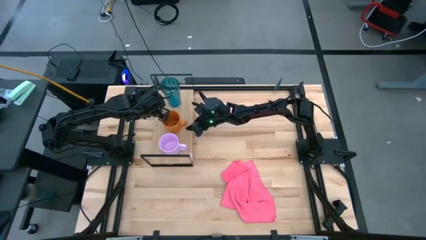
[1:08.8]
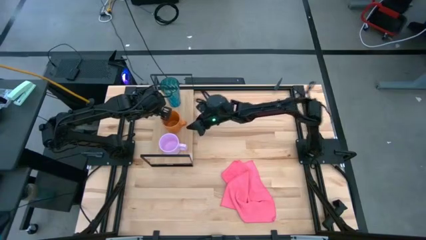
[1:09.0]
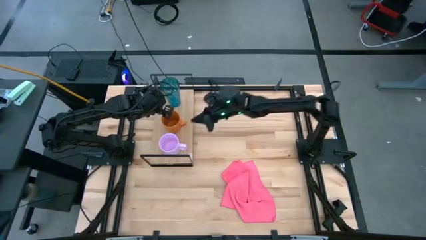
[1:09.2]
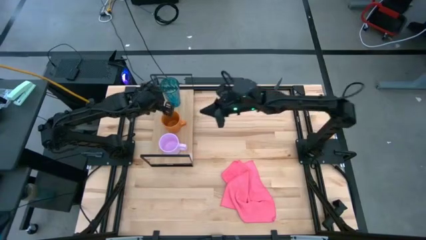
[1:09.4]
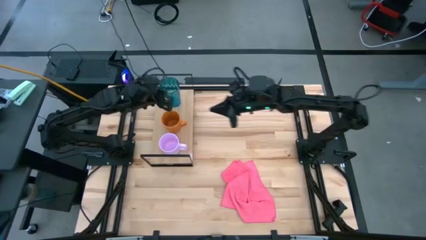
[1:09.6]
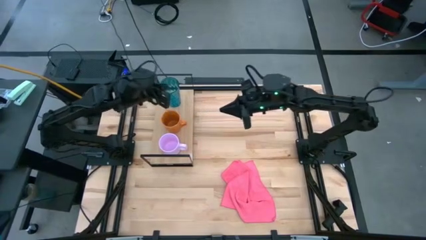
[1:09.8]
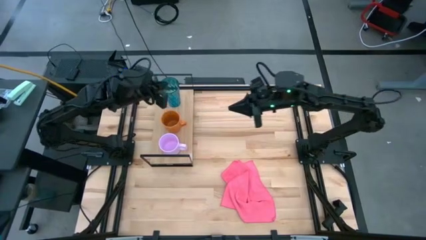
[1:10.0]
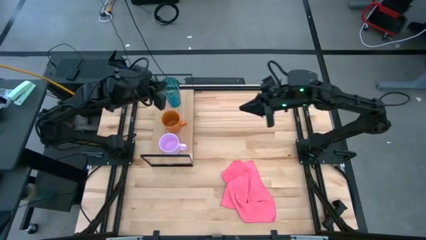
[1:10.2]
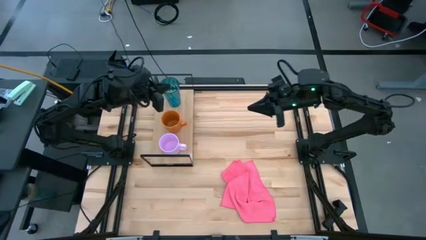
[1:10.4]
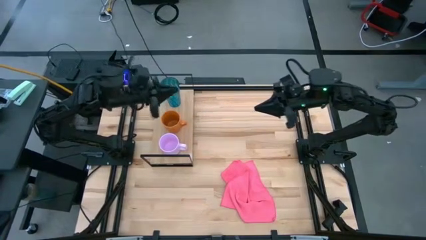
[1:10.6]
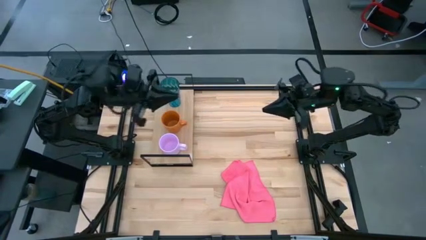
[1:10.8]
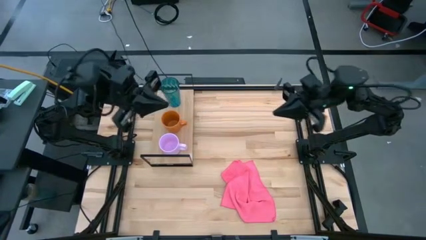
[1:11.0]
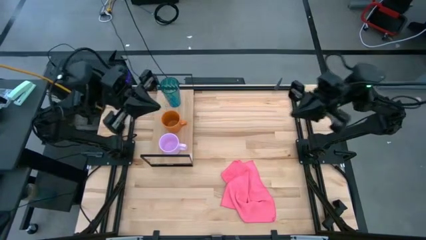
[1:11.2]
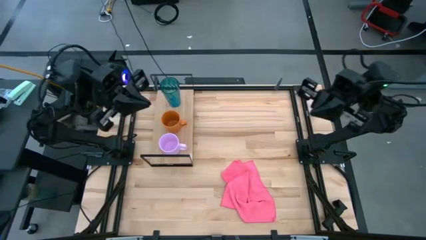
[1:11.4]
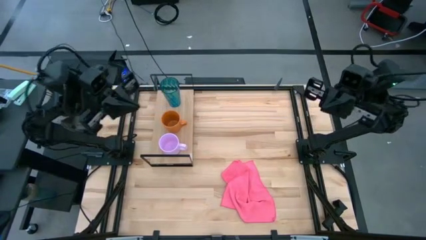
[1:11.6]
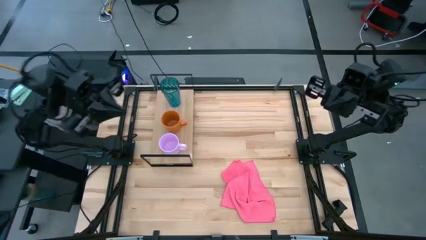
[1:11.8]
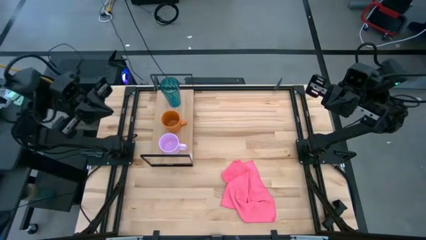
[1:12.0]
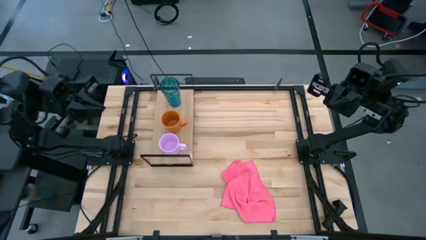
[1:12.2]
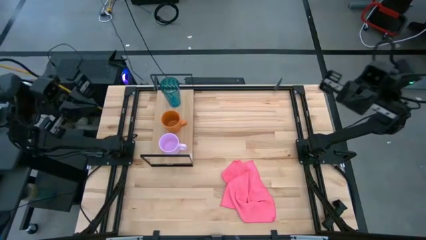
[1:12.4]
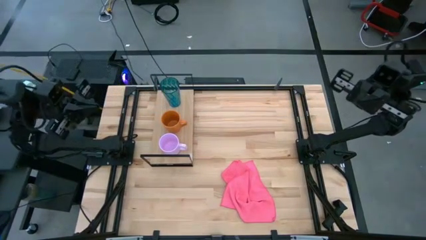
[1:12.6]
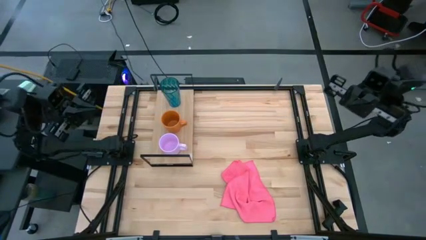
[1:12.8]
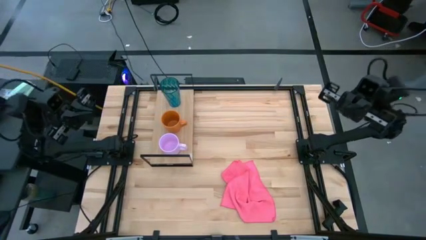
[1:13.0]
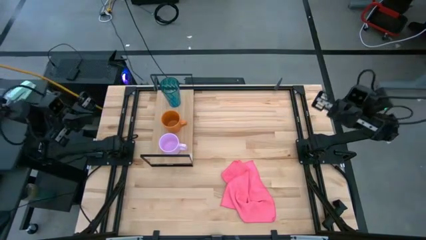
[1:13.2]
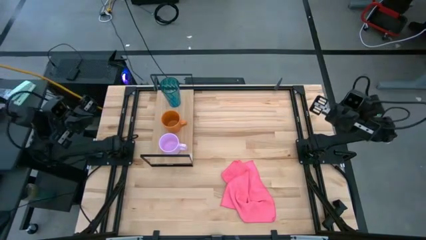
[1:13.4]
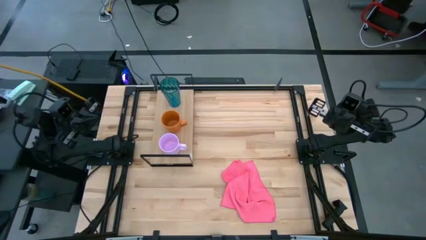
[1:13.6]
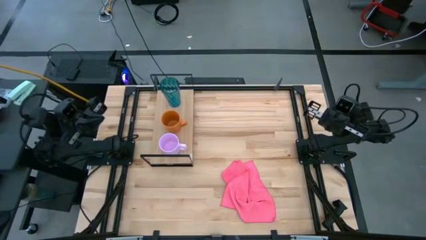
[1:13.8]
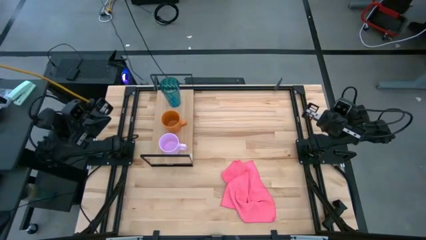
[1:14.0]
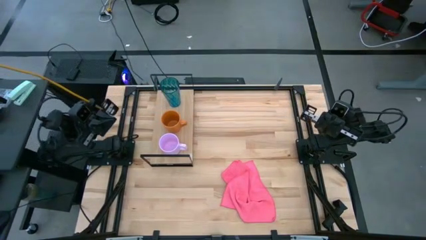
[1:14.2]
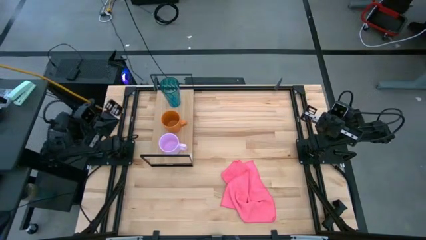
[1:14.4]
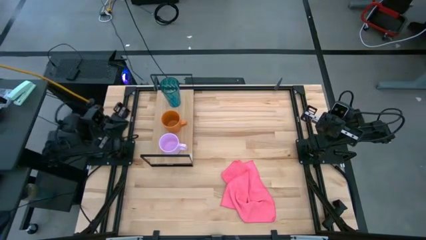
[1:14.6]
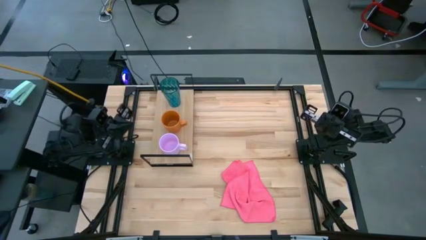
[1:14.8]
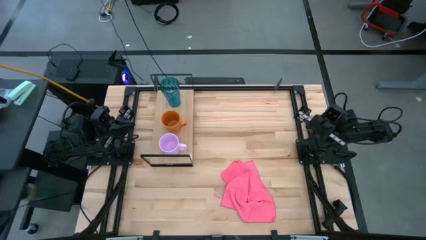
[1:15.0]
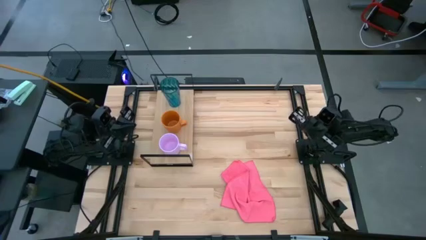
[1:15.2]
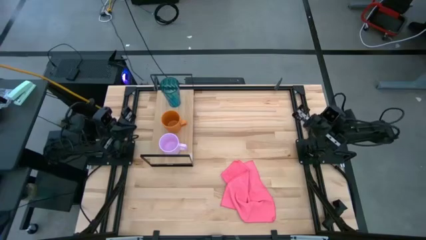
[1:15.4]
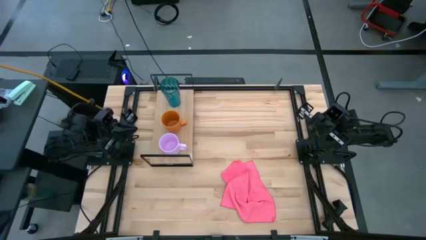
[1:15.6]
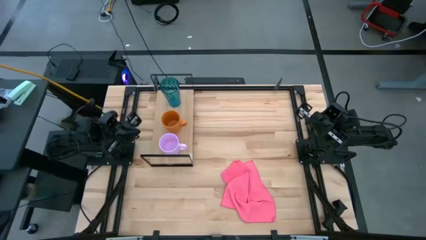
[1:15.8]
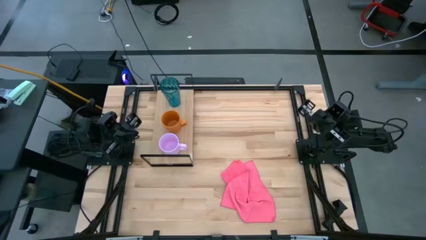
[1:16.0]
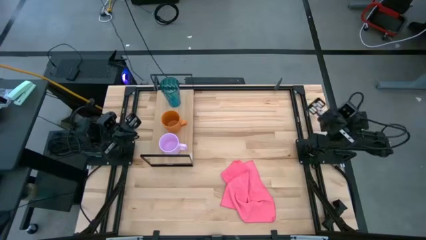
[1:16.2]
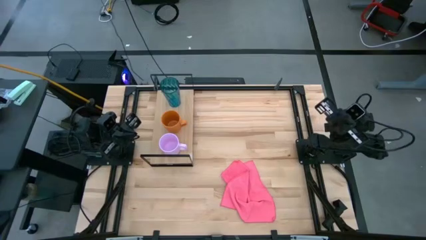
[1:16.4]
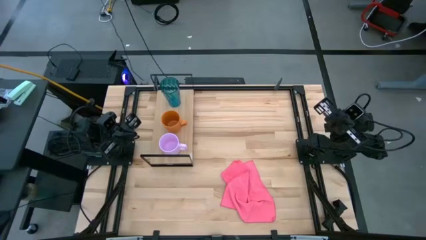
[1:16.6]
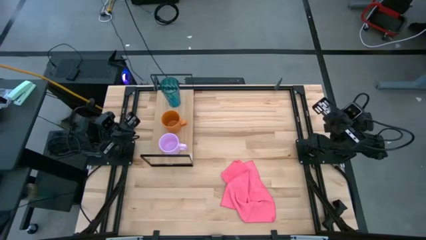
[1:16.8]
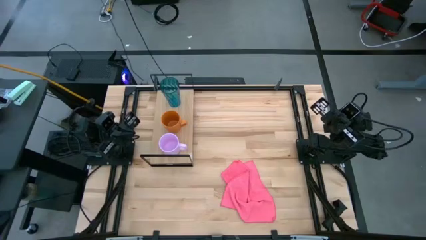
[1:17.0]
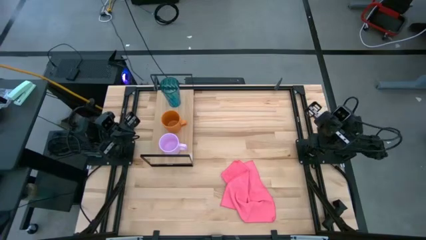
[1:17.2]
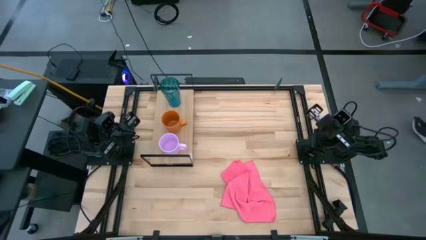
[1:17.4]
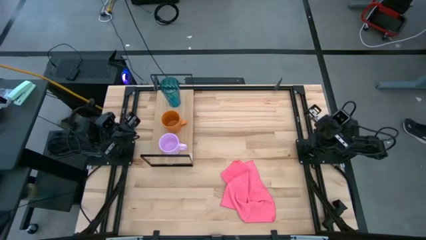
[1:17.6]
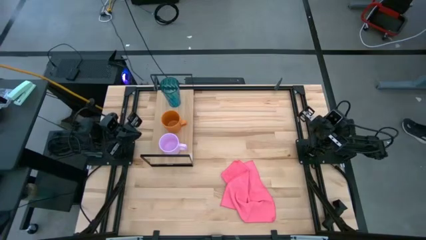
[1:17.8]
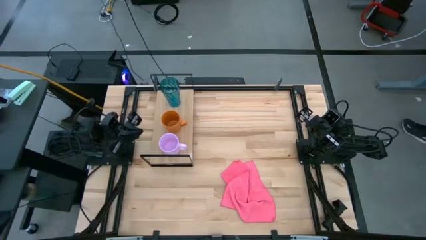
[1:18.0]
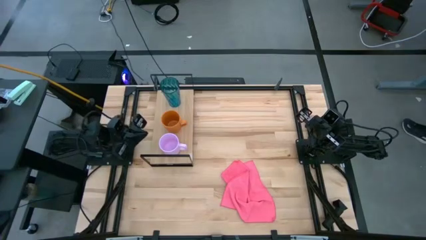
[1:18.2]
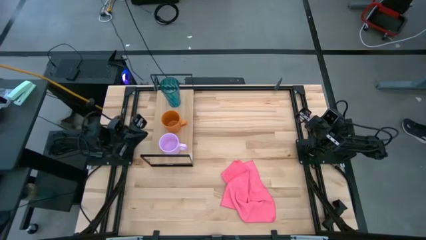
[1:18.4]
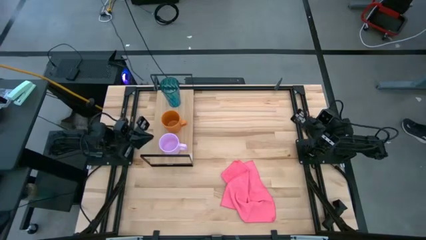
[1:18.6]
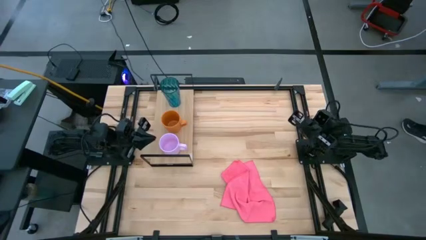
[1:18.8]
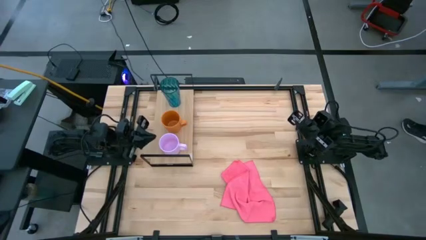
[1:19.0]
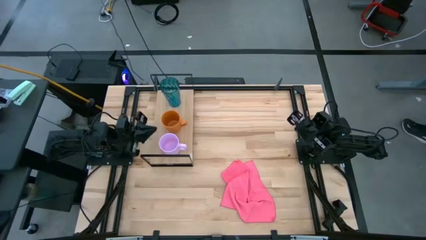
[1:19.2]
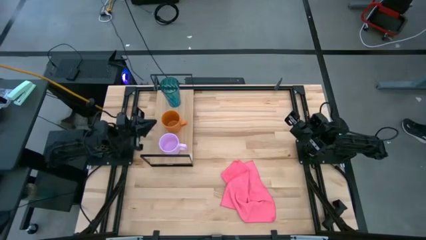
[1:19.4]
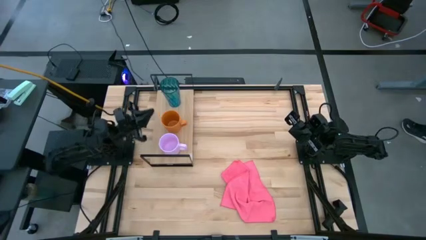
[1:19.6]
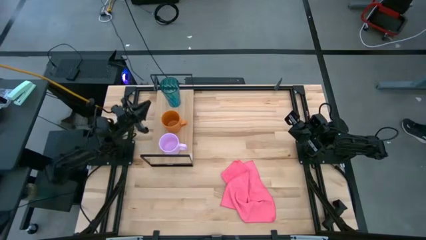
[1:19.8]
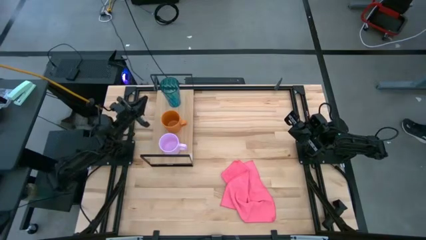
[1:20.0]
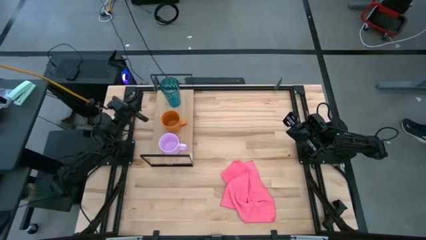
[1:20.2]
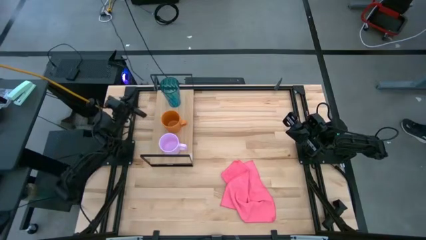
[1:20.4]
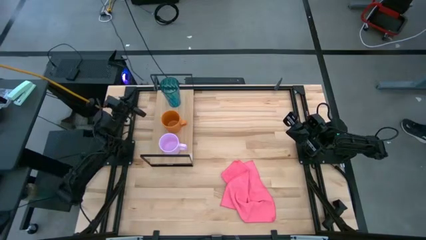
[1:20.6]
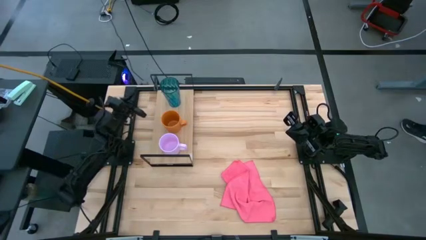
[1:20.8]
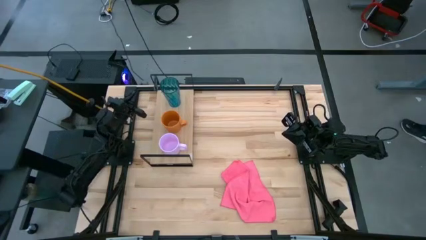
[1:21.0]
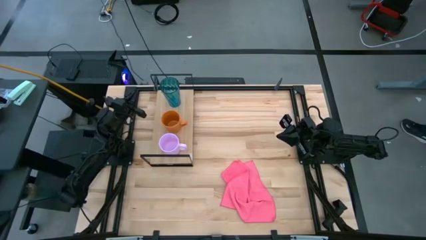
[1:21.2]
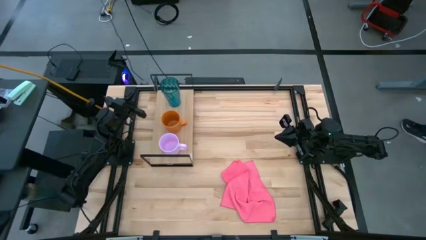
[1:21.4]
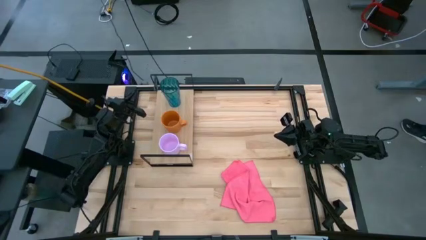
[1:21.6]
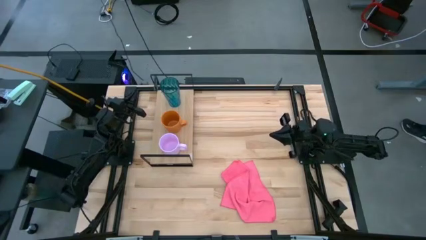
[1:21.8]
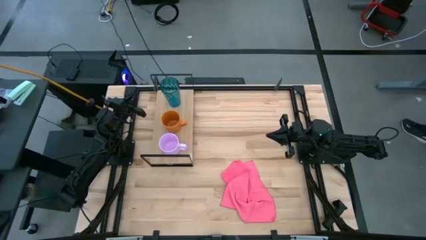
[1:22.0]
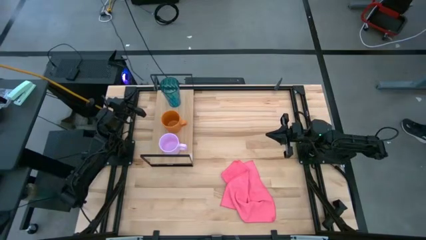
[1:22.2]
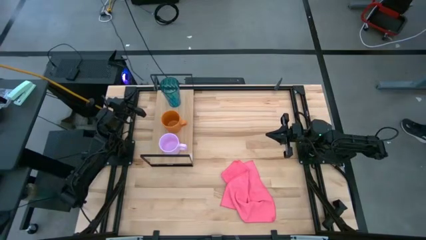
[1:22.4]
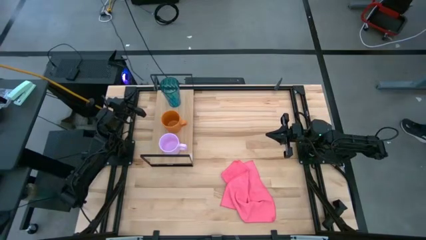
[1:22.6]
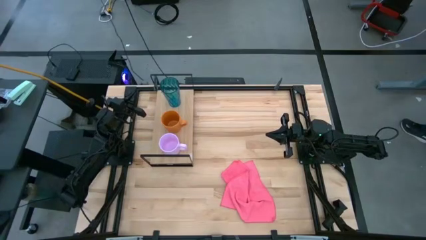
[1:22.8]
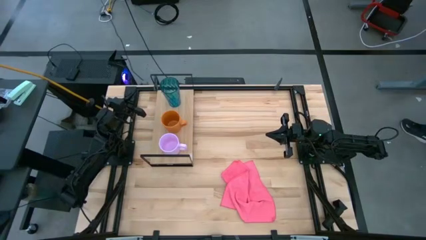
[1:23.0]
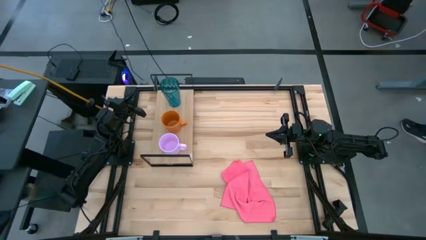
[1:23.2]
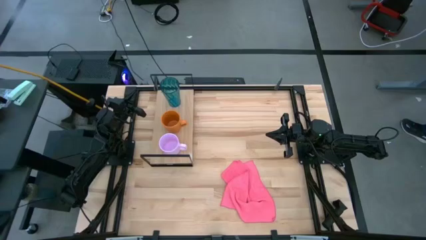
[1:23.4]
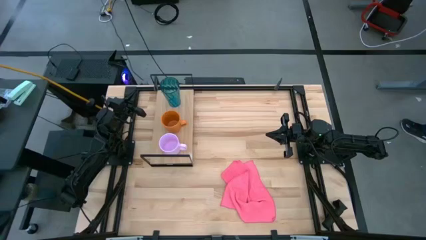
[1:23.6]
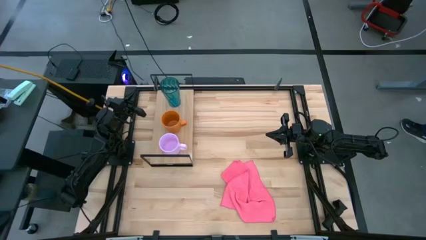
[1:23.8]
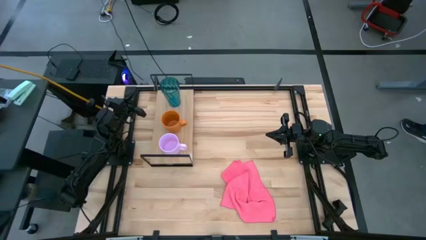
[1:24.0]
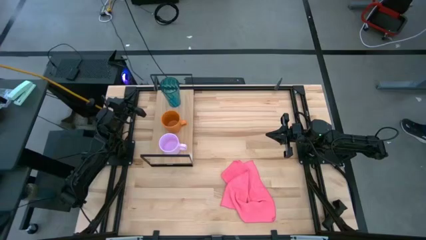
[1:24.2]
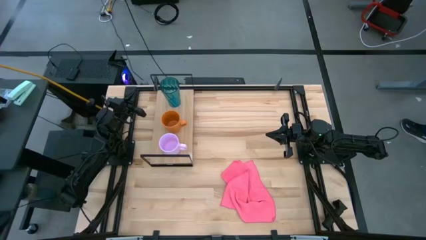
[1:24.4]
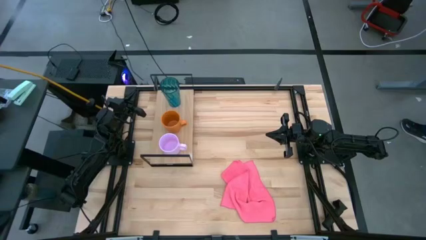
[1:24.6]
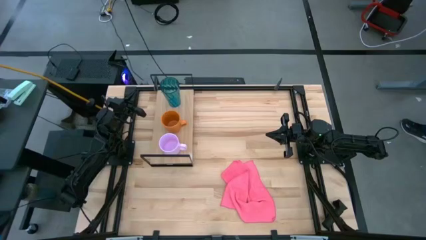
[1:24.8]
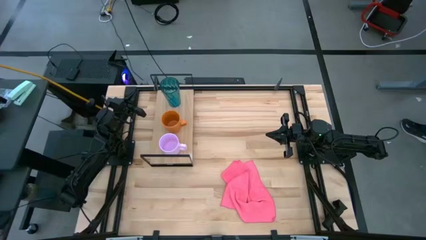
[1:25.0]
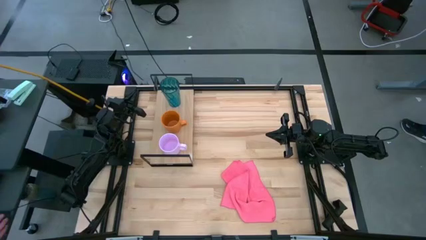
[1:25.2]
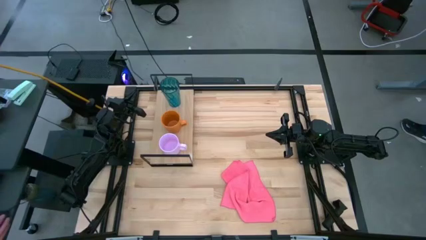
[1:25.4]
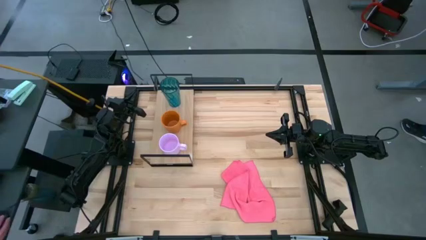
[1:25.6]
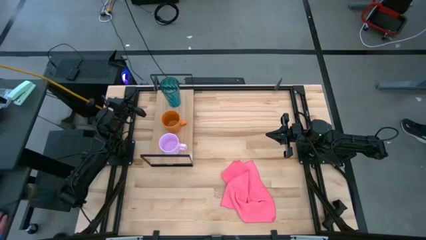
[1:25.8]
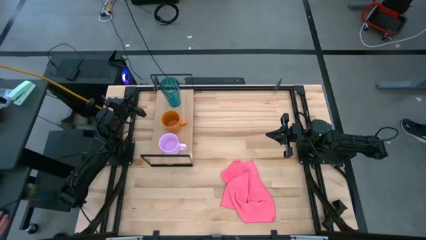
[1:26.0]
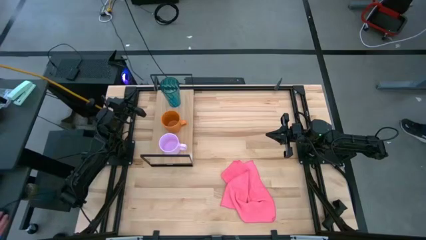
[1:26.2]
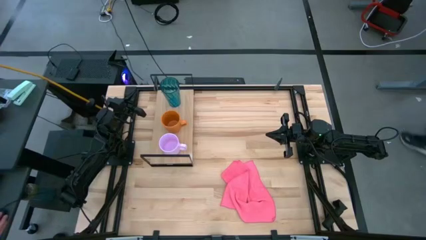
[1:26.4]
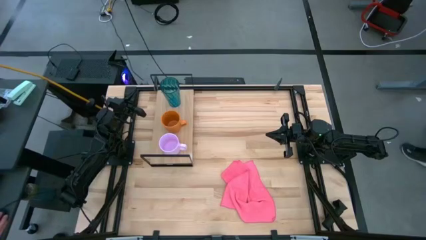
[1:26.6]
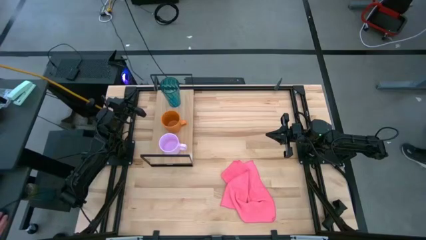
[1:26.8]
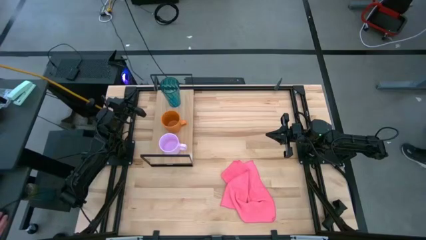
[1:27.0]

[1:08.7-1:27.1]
Task: Stack small to large cups/mugs on shelf
Return to Home Position
